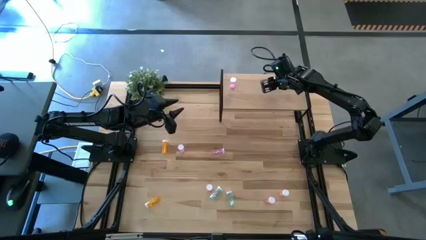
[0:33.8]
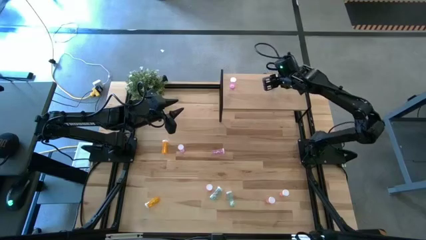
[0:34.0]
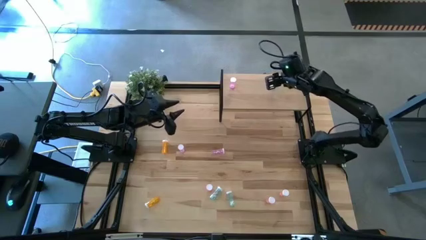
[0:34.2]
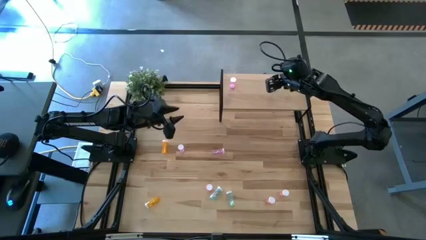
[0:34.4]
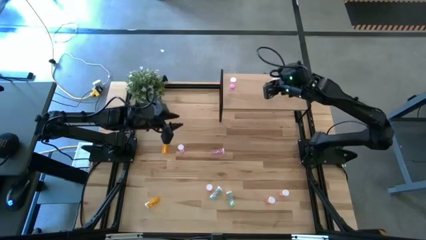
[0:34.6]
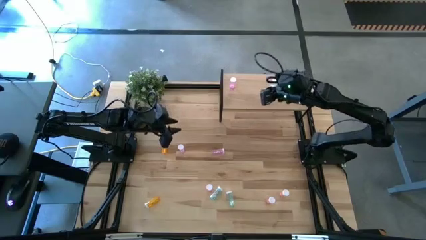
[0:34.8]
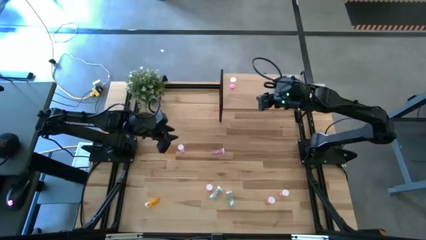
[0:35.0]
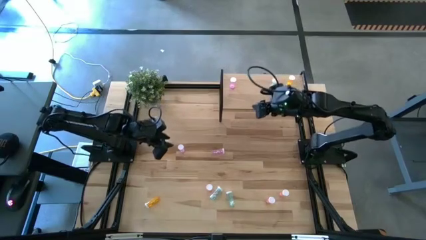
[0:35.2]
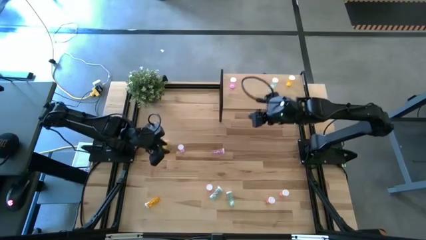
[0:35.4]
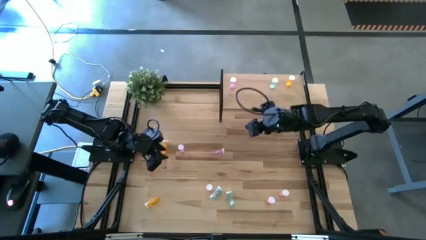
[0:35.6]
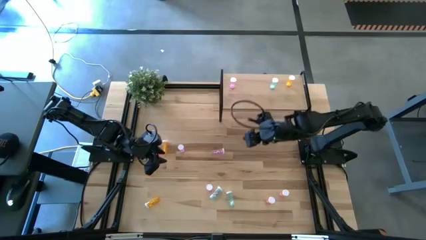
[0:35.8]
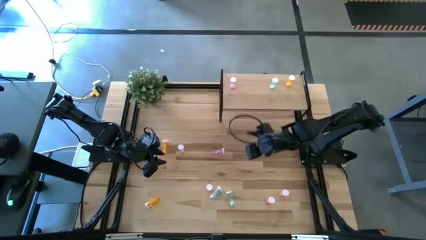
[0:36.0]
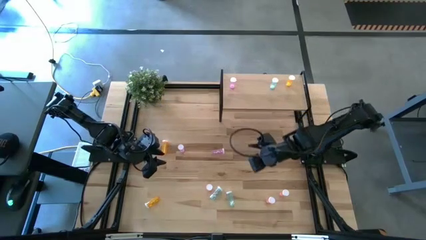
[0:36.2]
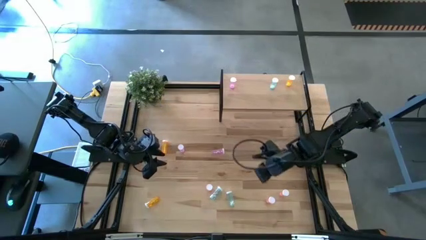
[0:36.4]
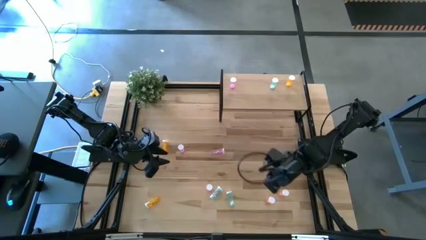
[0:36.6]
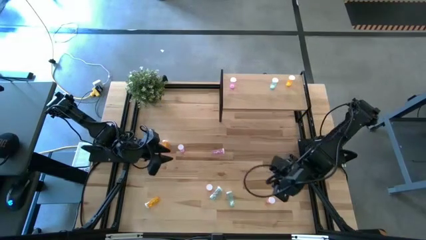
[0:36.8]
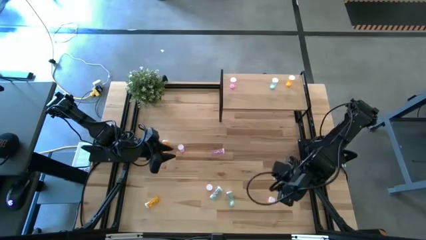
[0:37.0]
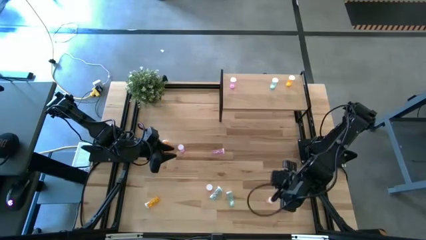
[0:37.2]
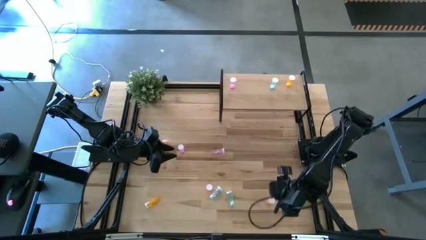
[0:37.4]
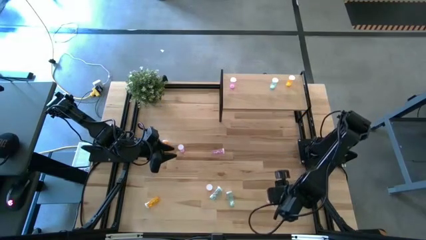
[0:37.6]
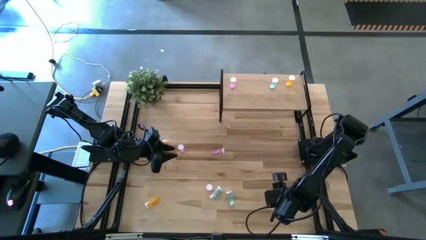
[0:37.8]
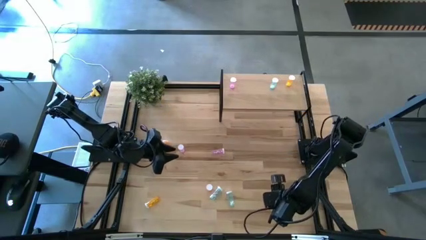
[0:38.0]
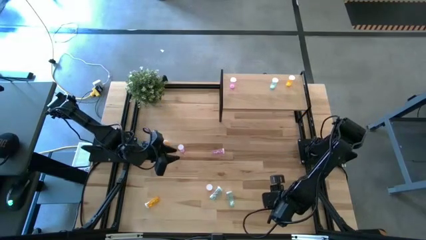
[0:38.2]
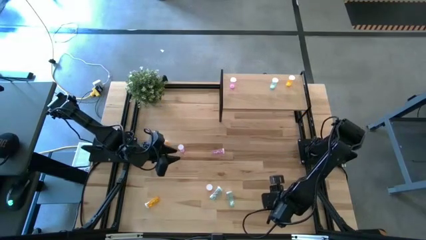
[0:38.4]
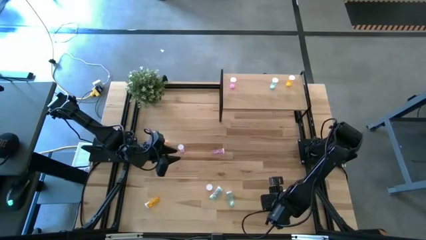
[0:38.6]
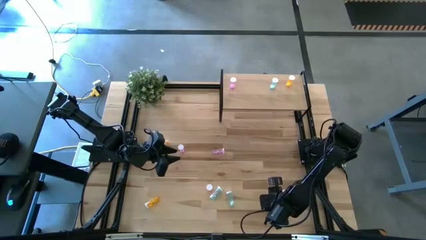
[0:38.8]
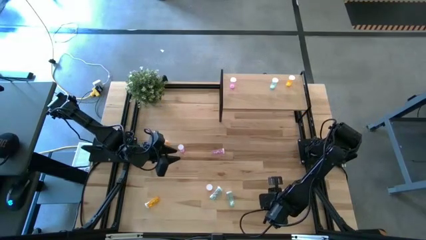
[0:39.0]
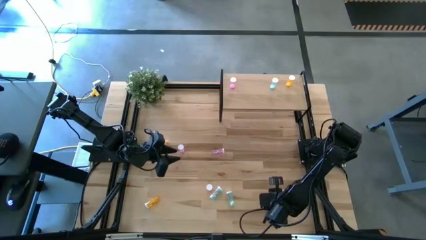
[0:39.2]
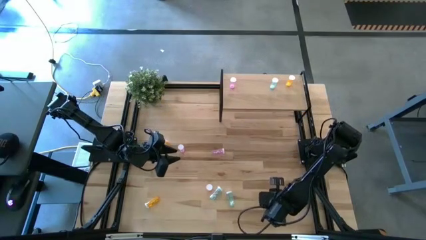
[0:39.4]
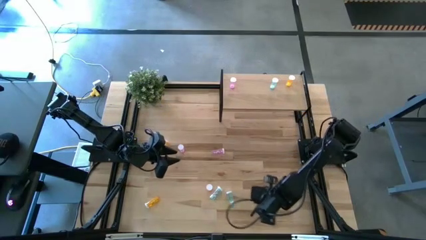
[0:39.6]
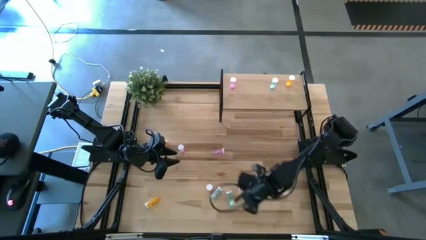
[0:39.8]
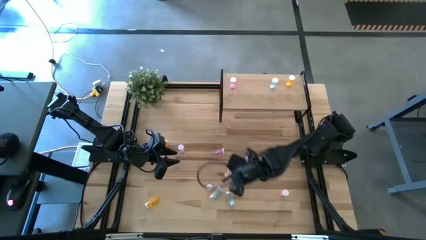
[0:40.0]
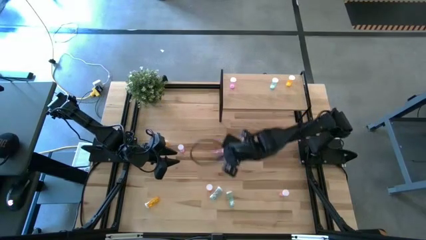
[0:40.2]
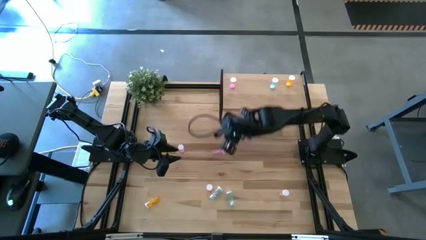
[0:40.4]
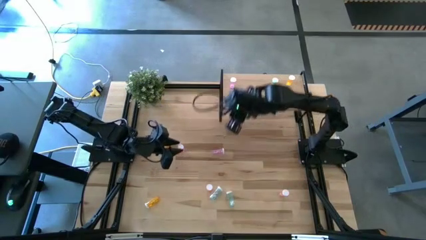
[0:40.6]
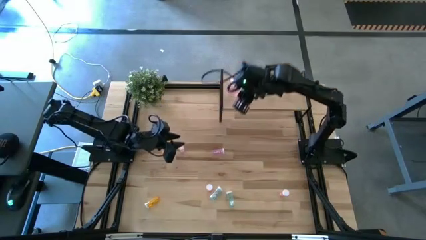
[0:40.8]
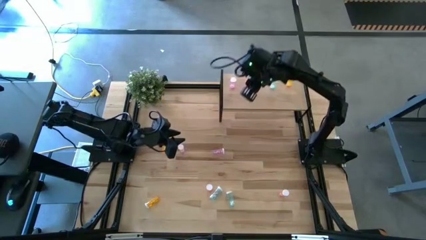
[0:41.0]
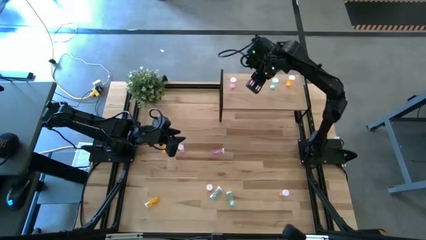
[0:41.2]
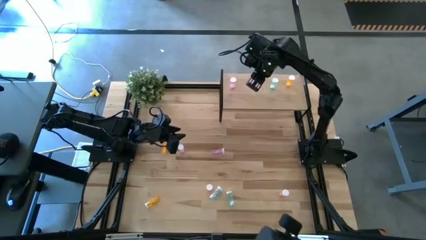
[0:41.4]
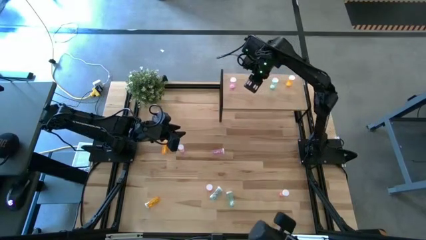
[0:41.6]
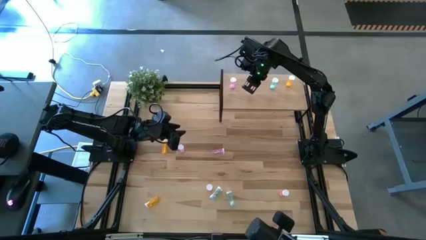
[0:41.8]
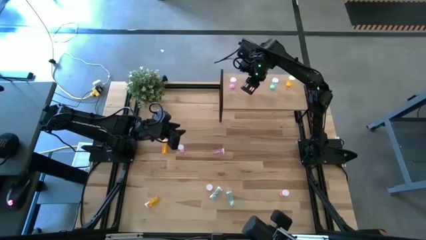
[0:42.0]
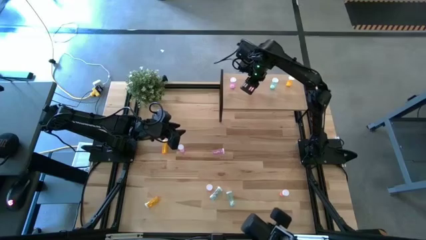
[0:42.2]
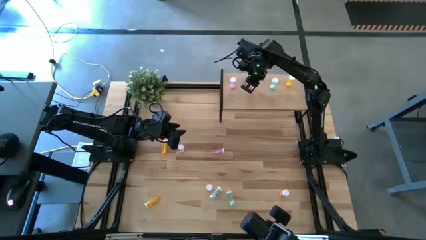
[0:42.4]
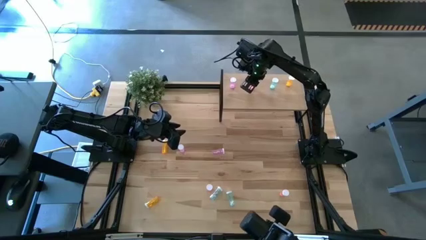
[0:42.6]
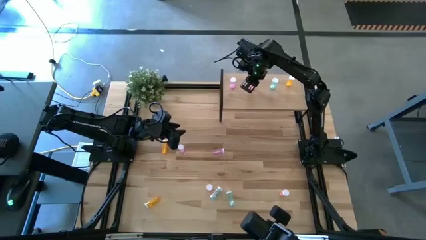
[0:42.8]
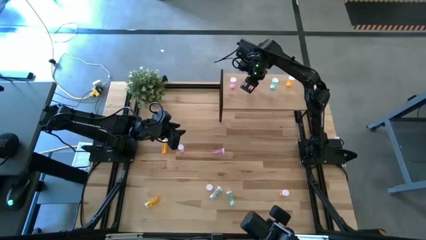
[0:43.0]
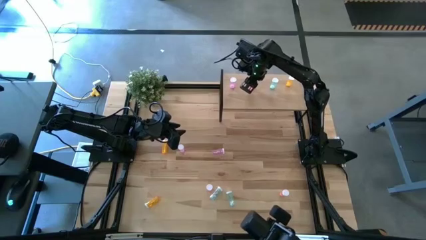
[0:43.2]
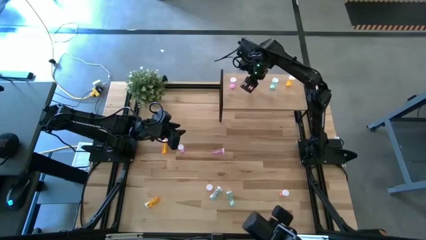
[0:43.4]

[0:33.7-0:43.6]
Task: Pick and place medicine bottles onto shelf by color
Put the bottom red pill bottle on the shelf

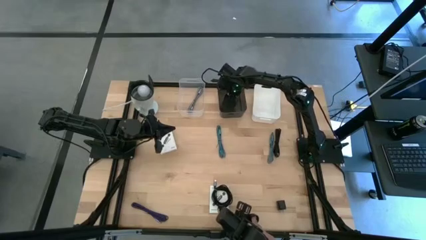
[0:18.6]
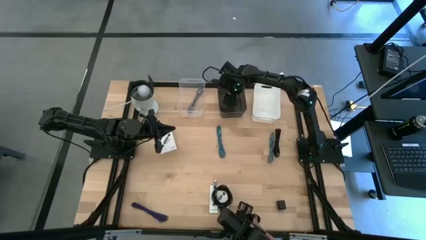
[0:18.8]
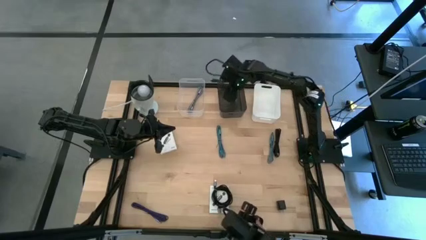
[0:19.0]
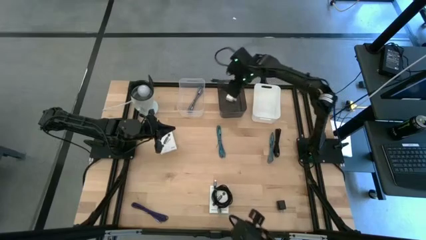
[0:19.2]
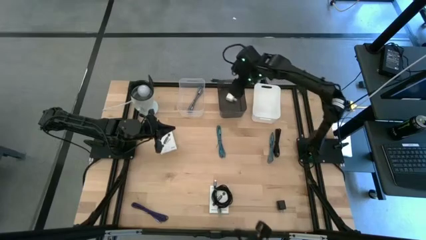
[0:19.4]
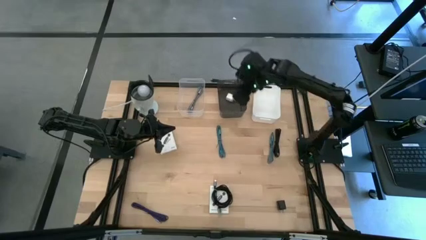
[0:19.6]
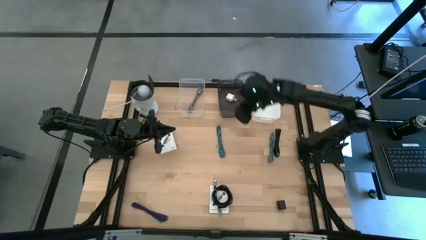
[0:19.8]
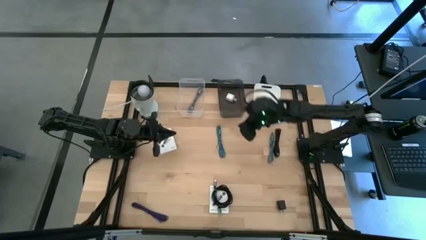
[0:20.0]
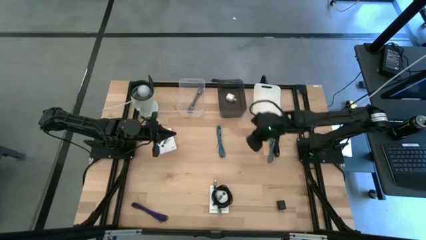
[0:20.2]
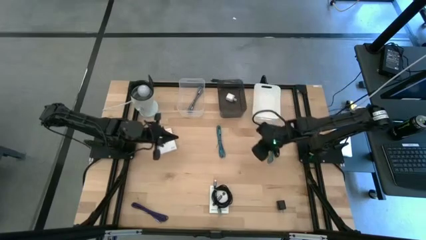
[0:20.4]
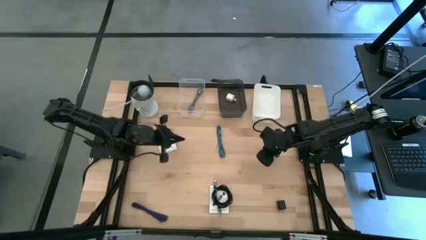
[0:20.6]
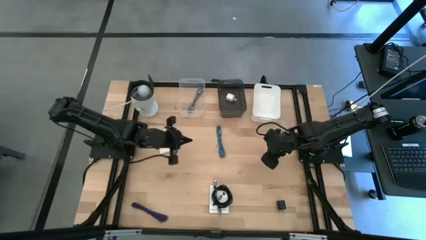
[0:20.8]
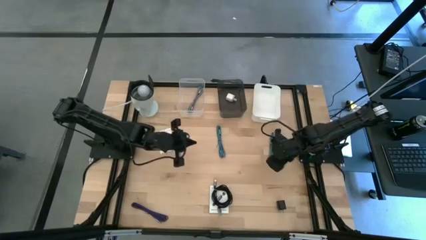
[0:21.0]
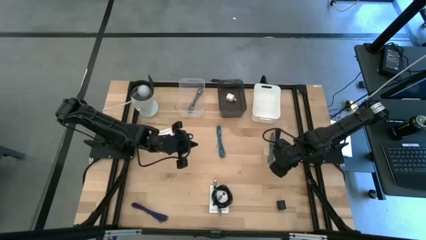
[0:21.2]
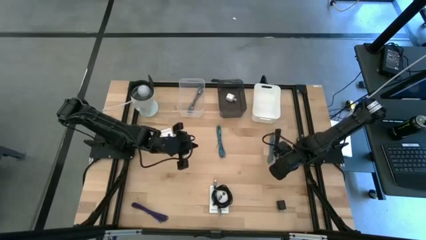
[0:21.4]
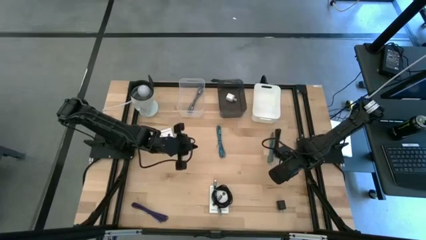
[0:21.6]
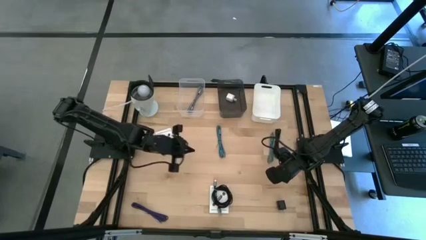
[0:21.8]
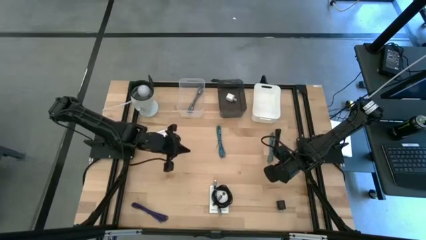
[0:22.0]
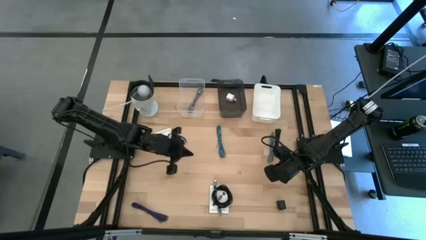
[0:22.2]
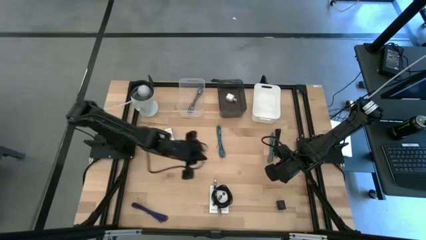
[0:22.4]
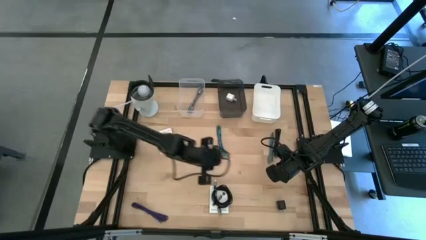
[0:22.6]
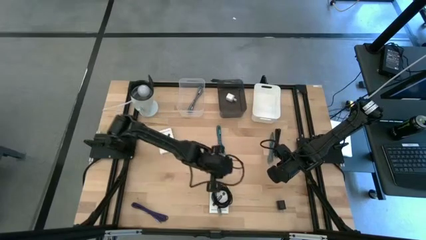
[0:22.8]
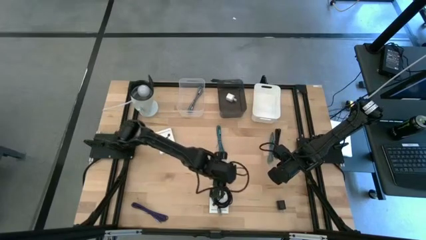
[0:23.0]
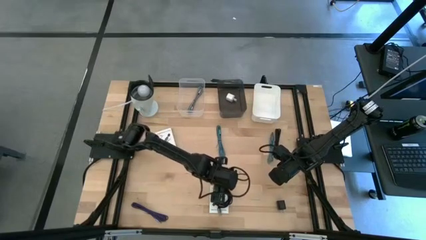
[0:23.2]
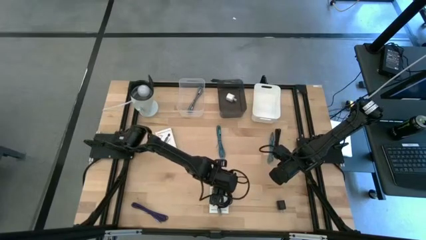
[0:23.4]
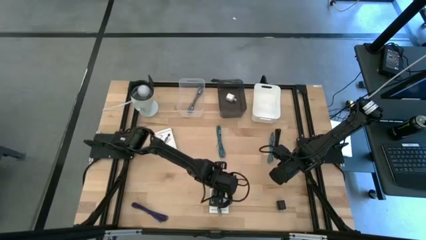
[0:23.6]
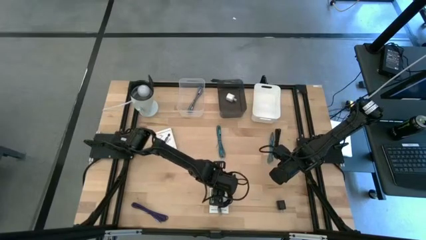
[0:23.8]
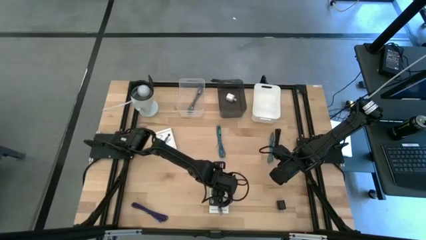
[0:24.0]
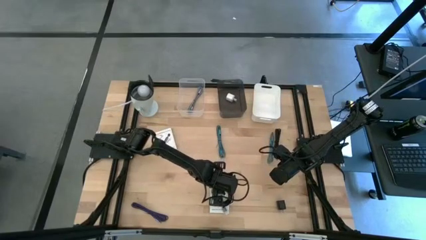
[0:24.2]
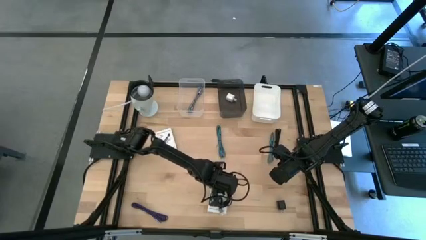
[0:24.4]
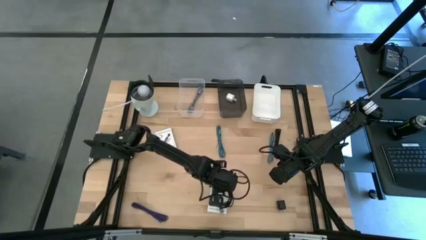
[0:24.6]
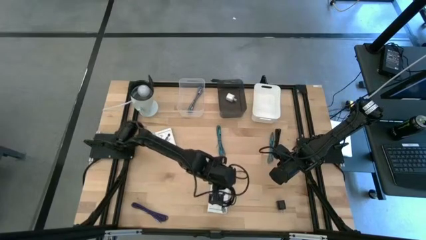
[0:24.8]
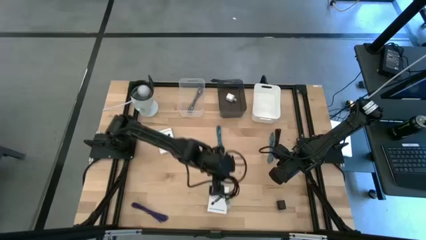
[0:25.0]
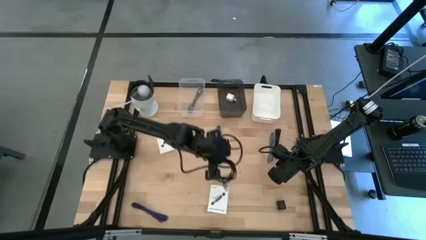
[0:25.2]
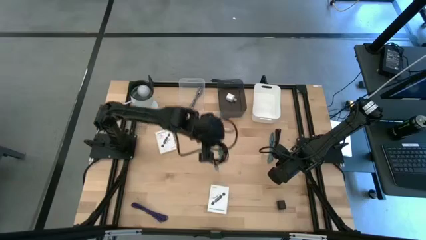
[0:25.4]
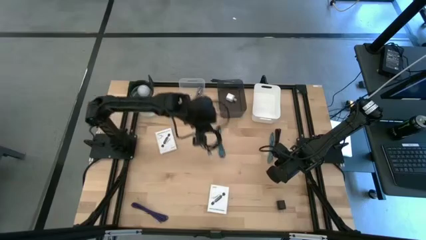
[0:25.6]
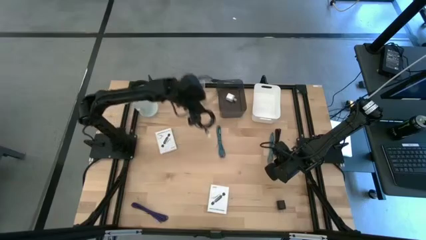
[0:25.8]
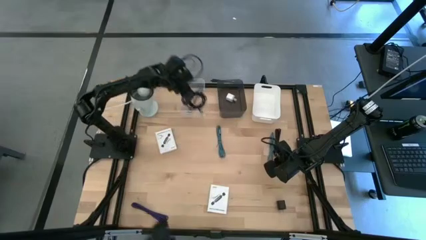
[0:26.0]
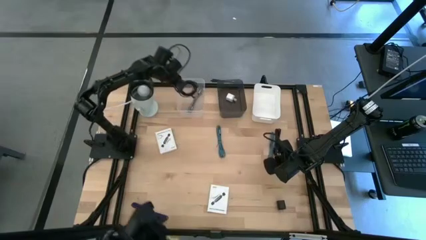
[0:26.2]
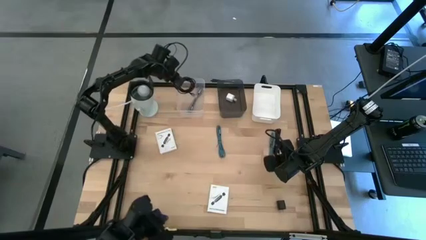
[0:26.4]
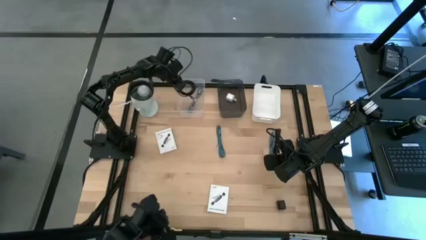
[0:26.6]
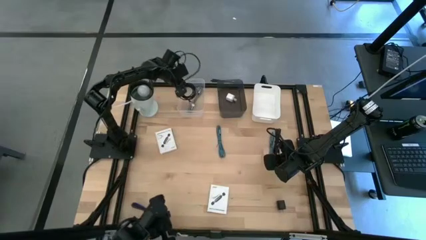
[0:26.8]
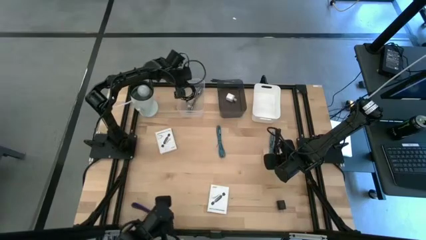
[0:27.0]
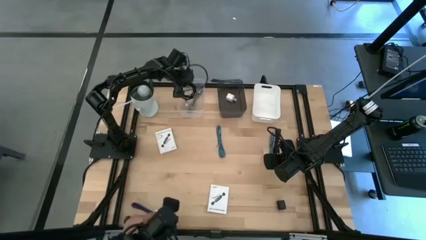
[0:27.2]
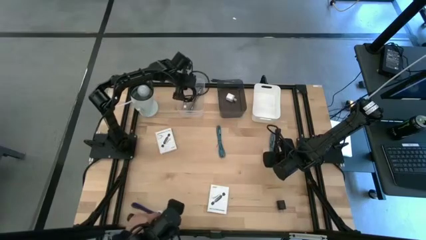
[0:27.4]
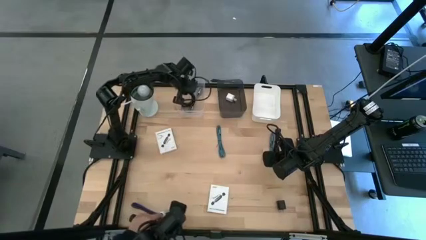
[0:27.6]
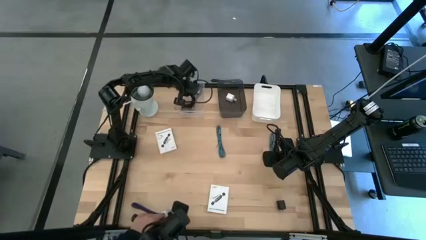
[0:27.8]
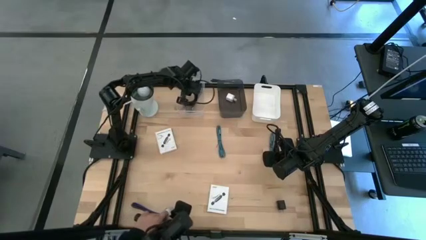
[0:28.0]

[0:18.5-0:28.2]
Task: Pick and place items into bin
Put the bottom black charger cable into the transparent bin
